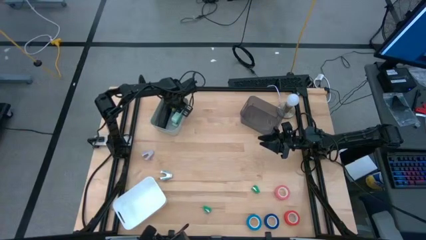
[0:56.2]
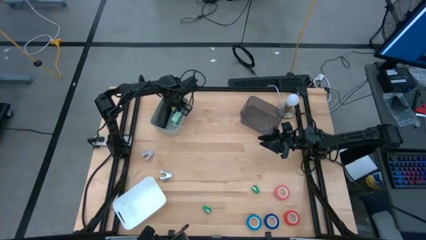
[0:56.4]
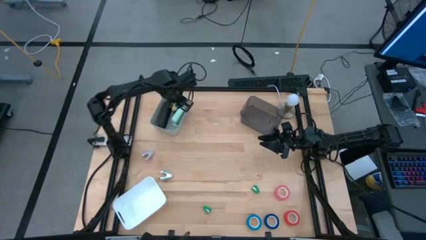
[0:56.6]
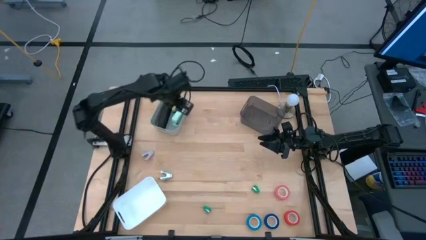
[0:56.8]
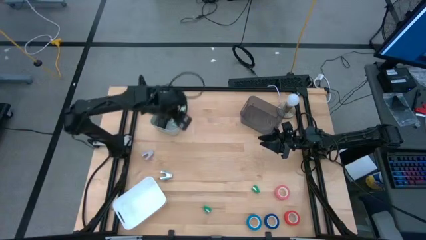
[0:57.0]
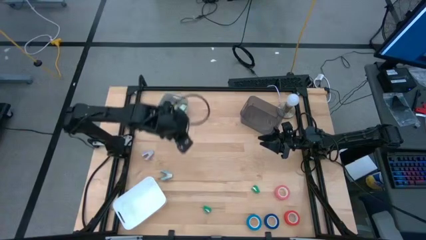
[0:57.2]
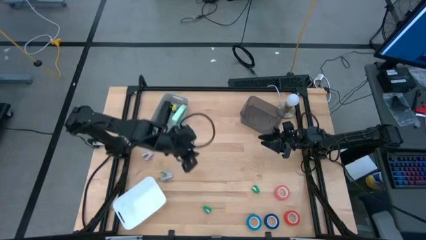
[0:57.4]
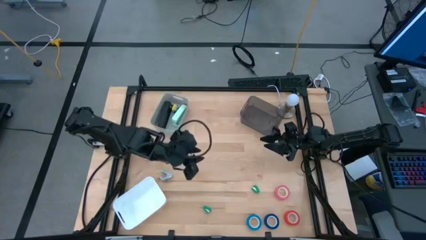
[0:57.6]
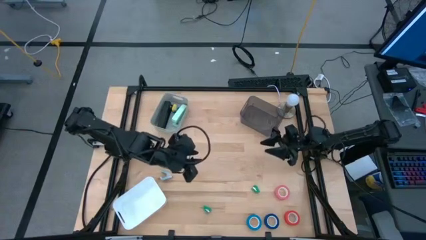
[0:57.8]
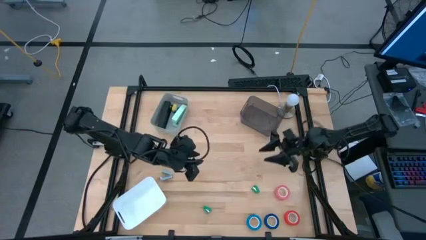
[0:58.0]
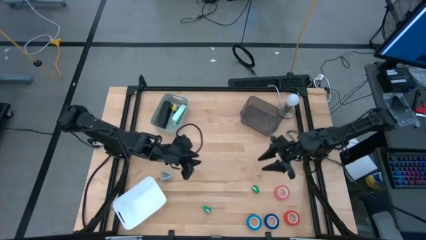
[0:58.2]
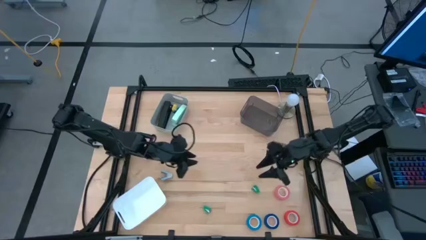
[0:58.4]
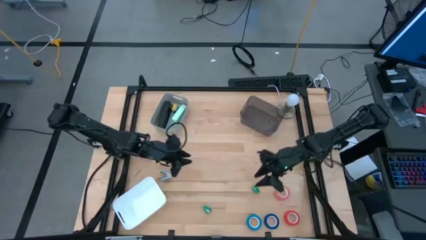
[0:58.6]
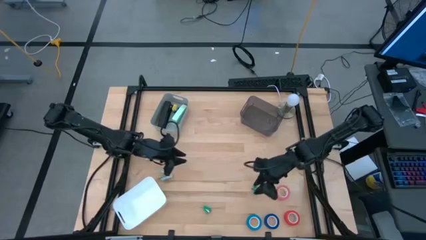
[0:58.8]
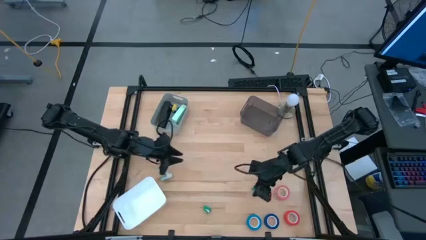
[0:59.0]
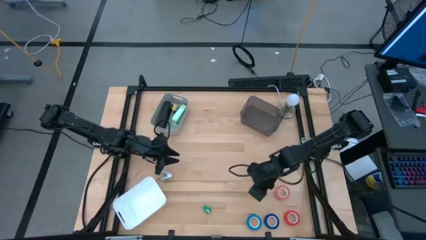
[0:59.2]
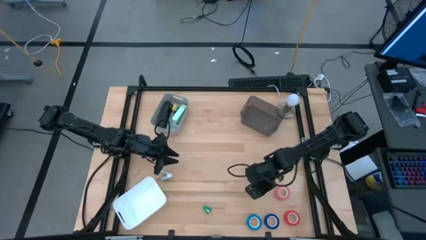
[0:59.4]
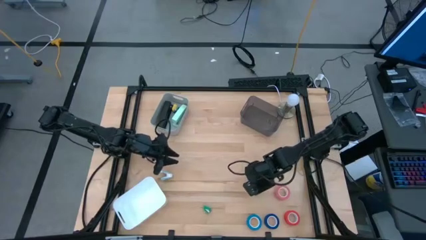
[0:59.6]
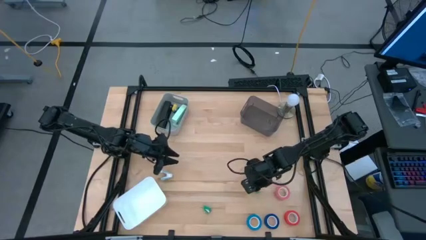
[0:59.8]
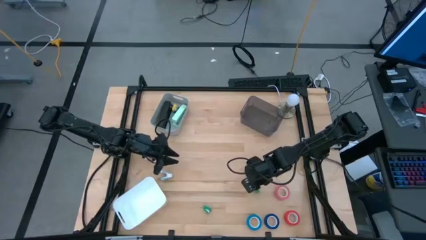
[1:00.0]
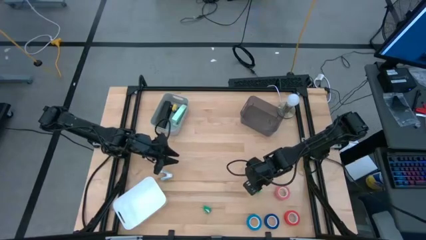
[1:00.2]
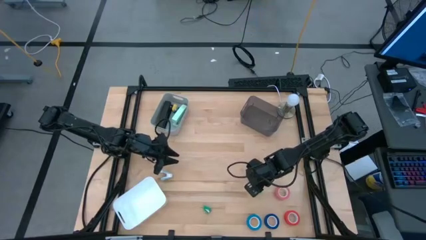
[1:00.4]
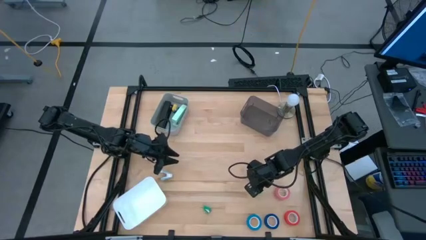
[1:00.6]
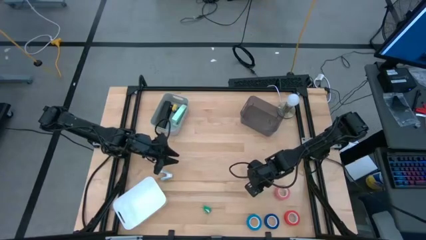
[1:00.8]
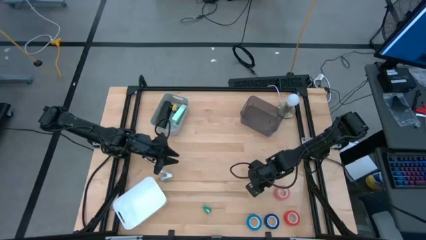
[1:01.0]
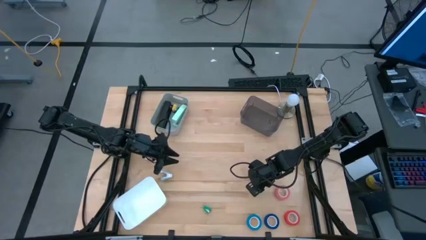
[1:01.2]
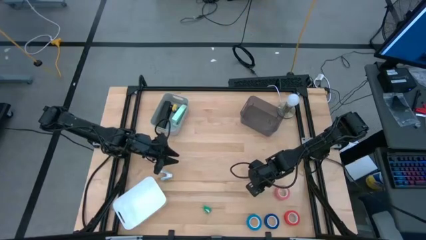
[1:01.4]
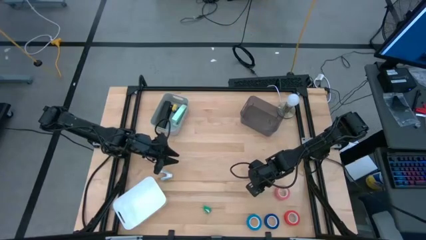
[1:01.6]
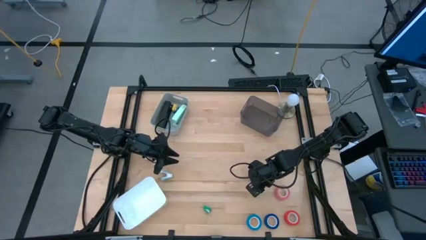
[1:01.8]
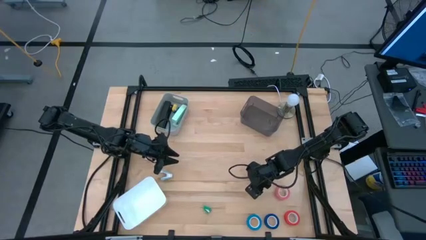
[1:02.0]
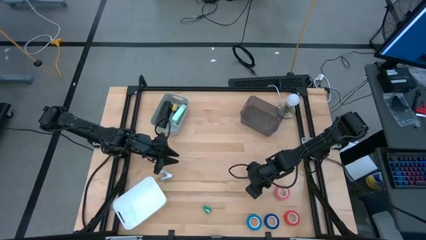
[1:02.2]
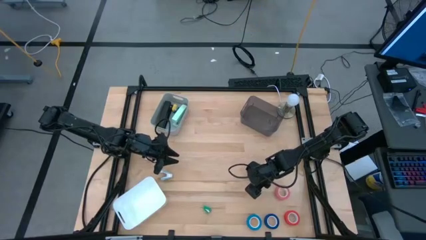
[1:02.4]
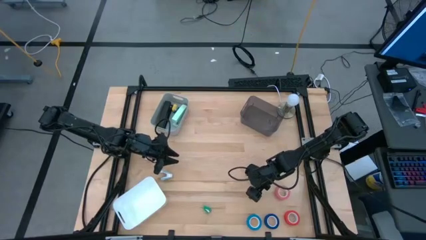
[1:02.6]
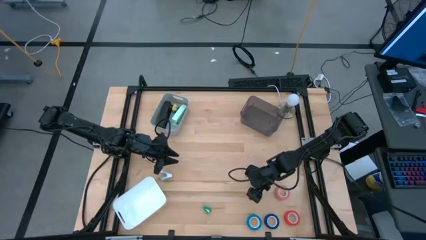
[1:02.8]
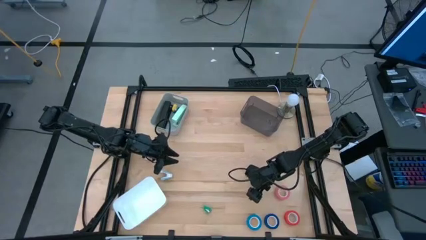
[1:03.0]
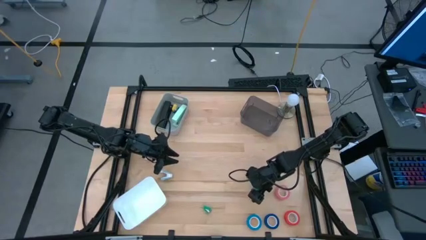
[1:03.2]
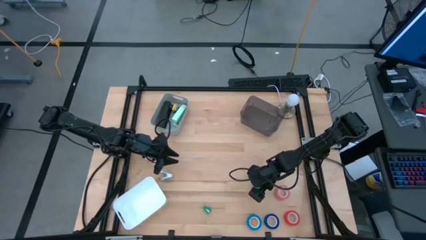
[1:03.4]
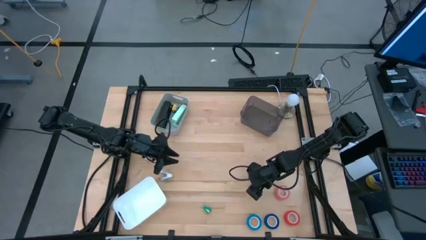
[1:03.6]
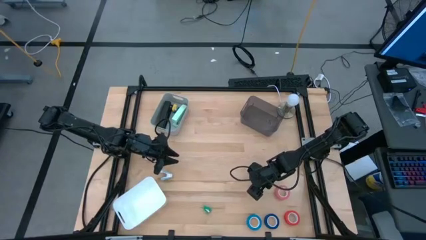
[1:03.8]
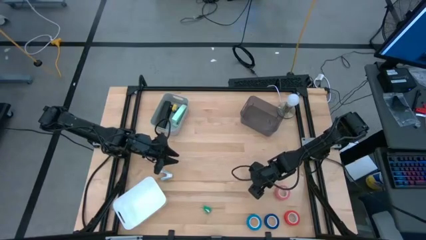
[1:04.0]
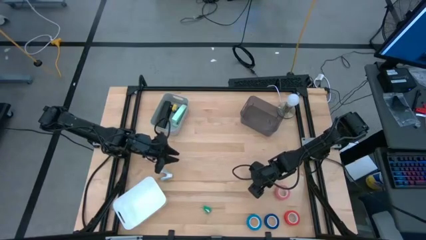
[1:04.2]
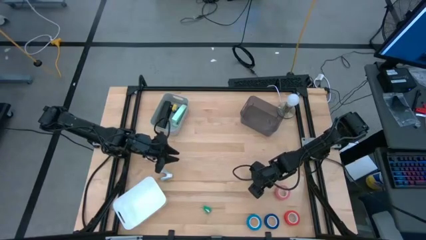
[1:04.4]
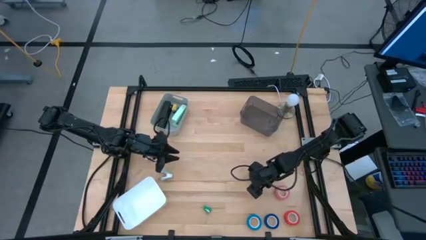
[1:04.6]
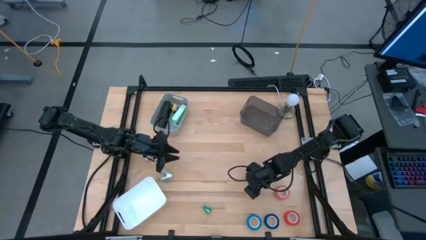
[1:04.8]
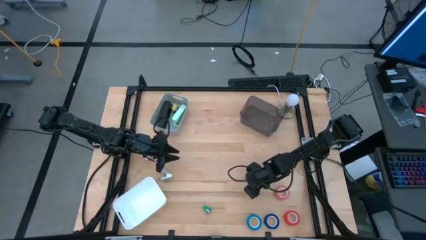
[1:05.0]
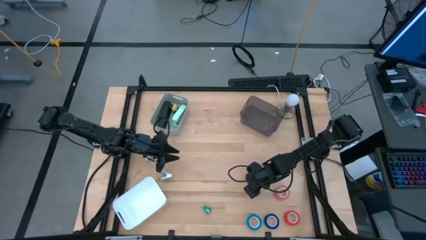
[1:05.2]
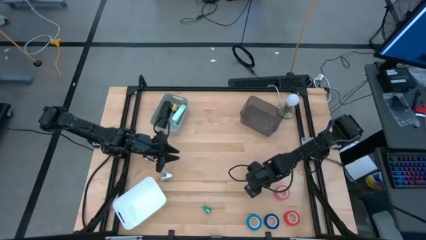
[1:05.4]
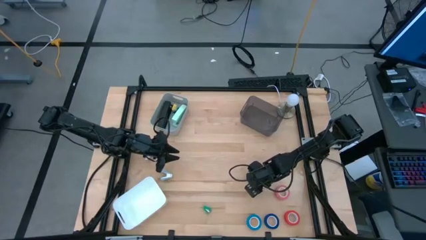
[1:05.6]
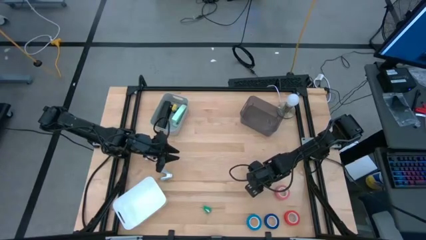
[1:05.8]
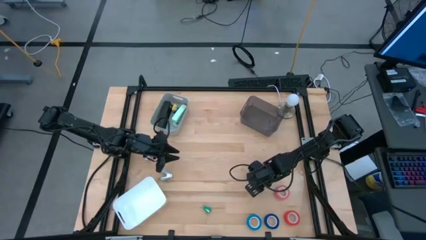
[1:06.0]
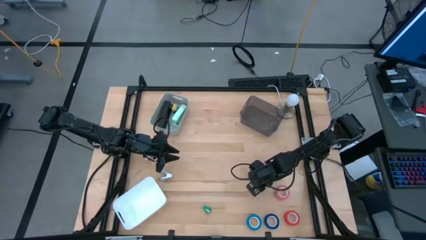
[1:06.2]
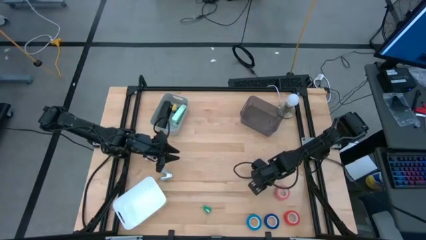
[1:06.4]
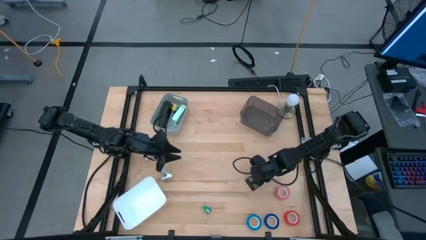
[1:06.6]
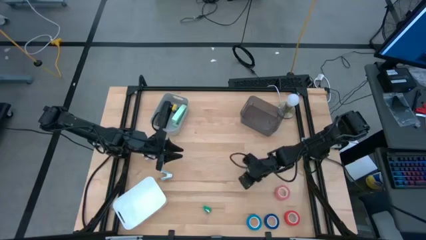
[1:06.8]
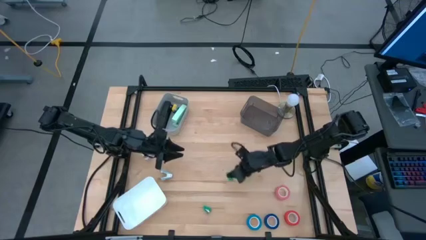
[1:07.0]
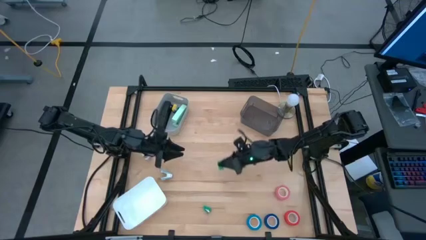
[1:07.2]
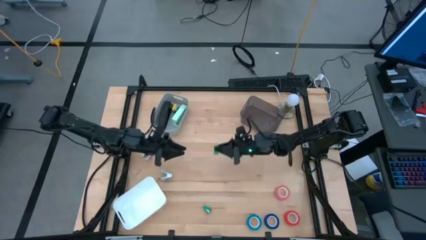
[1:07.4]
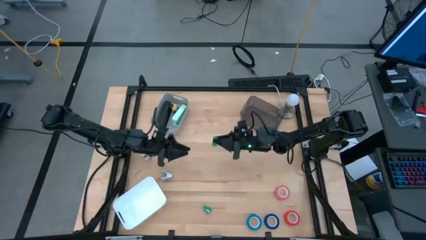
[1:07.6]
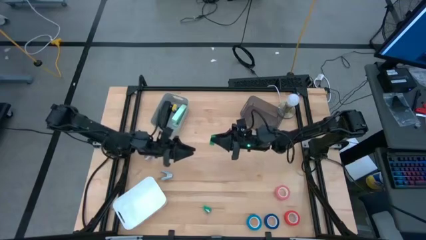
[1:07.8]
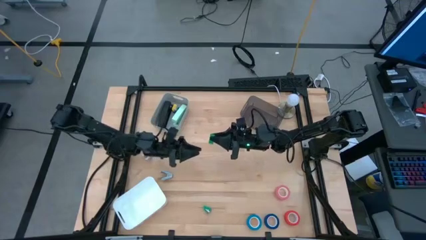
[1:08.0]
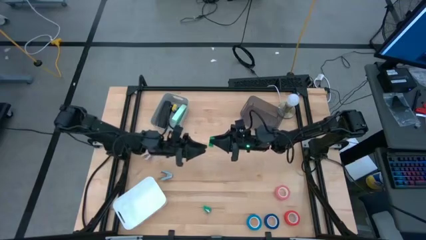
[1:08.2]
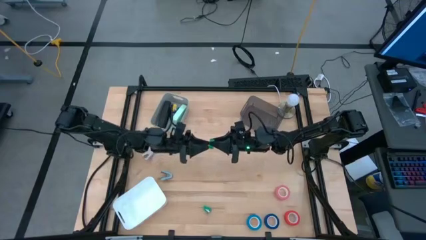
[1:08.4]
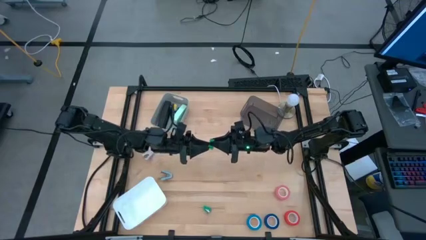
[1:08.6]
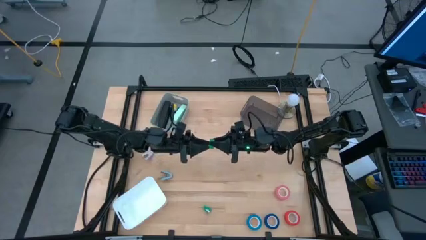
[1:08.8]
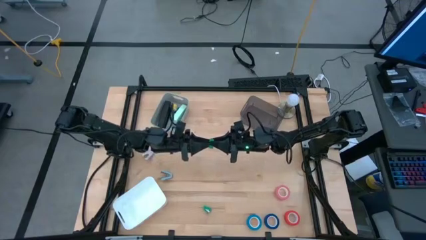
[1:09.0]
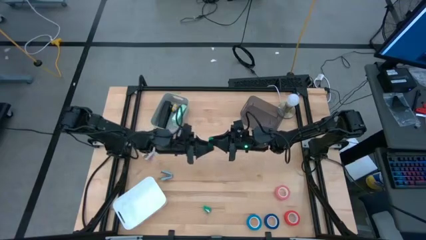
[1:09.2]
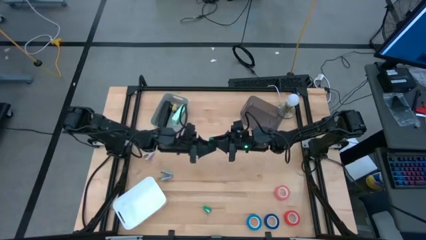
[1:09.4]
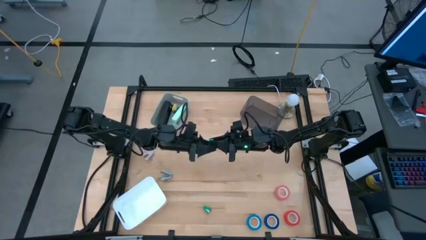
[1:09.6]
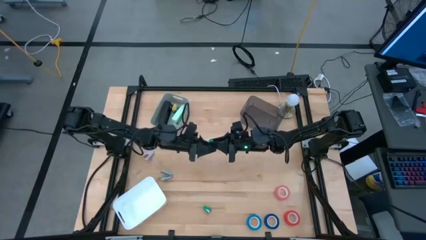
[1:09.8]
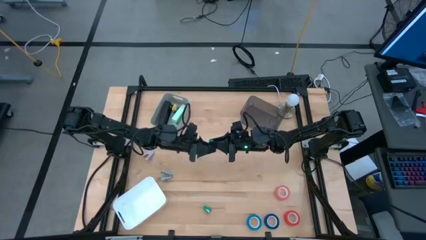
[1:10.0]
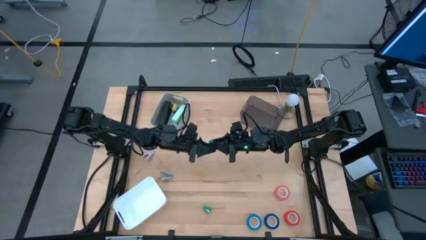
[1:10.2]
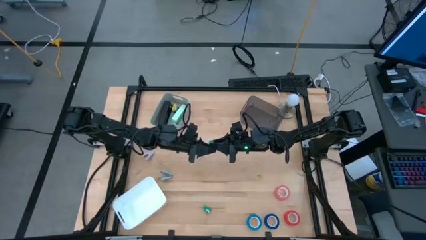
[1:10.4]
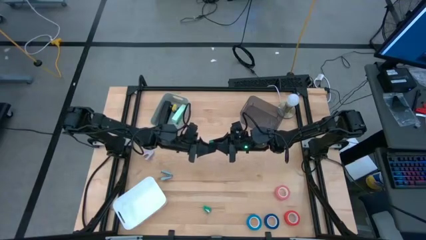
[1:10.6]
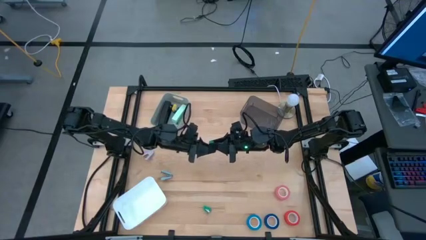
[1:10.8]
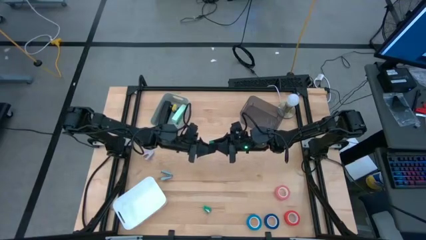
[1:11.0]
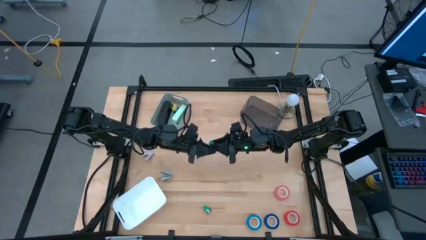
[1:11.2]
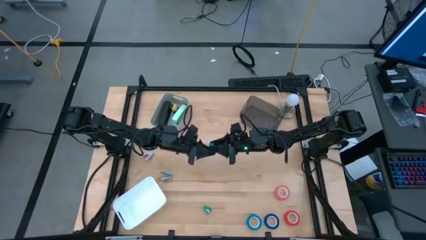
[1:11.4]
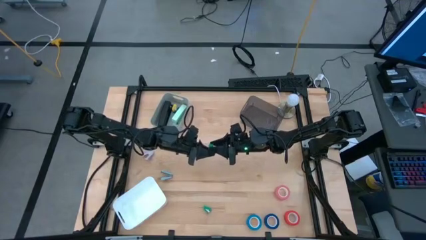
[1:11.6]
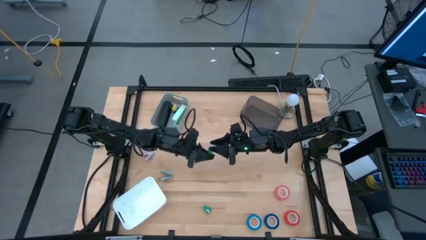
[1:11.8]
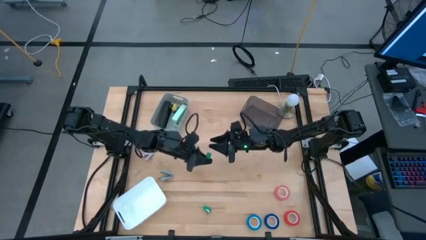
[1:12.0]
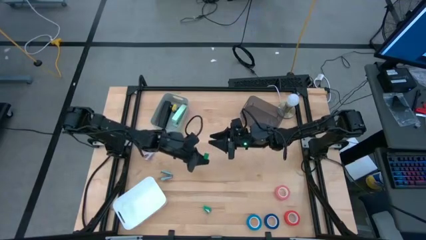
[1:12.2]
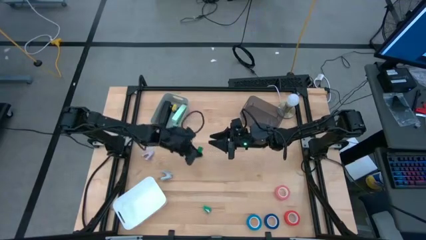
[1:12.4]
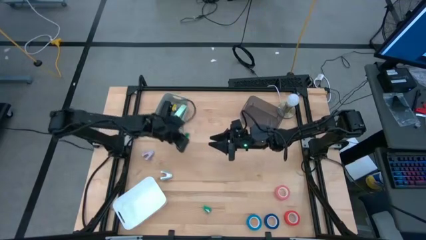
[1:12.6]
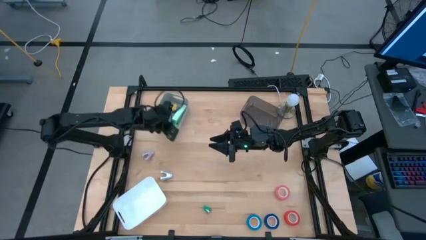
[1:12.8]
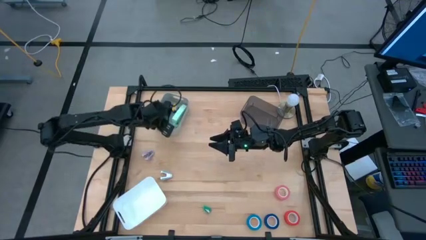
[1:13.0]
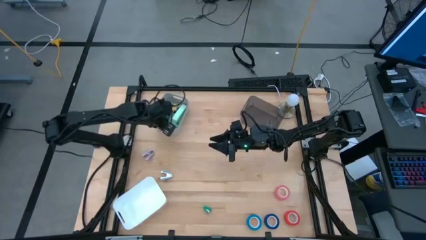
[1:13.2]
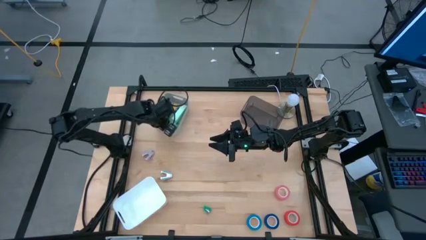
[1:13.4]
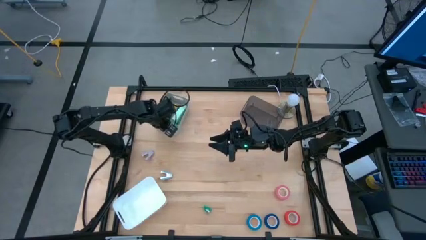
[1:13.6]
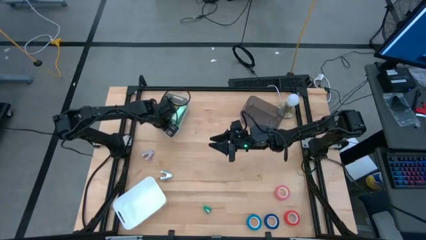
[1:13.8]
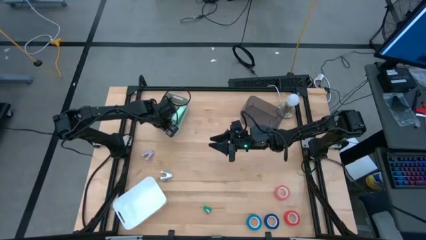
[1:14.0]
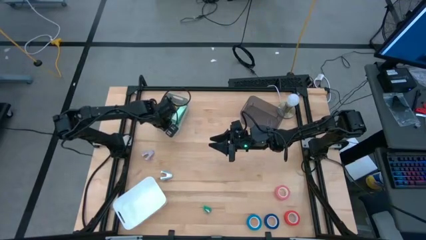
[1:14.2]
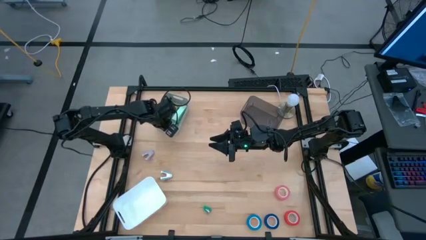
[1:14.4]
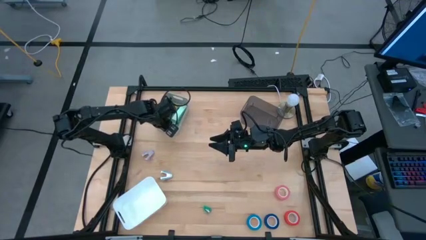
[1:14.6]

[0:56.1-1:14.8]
Task: Pick and place Stapler, Stapler remover, tape
Put the right small green stapler into the gray bin
